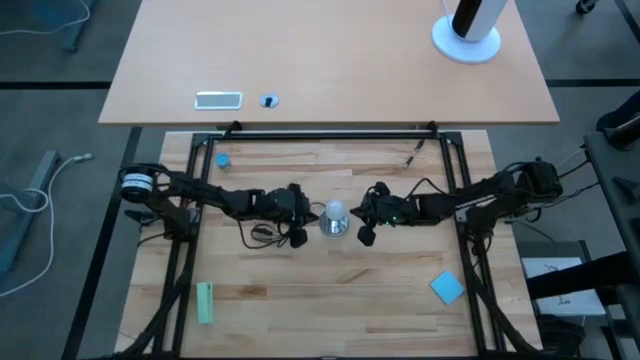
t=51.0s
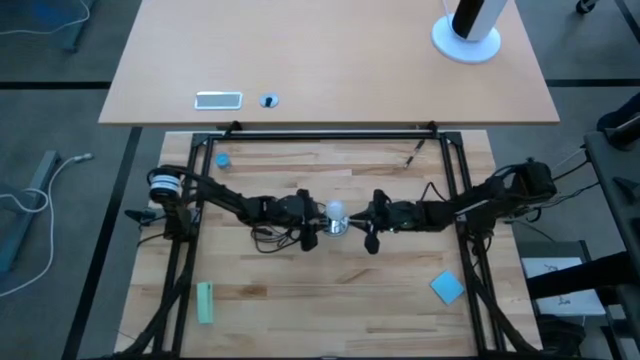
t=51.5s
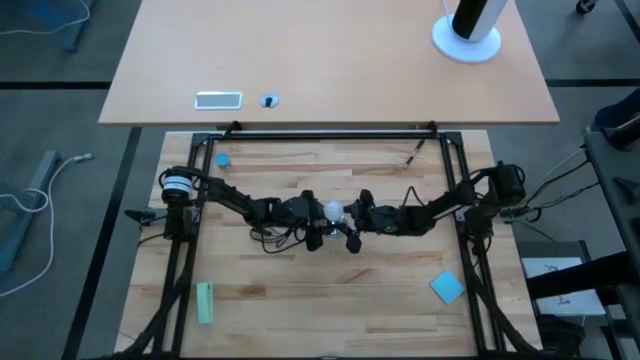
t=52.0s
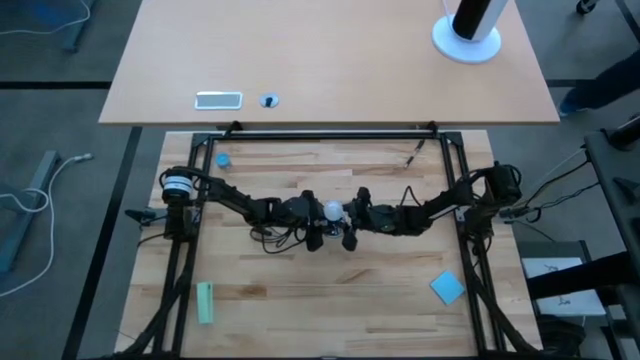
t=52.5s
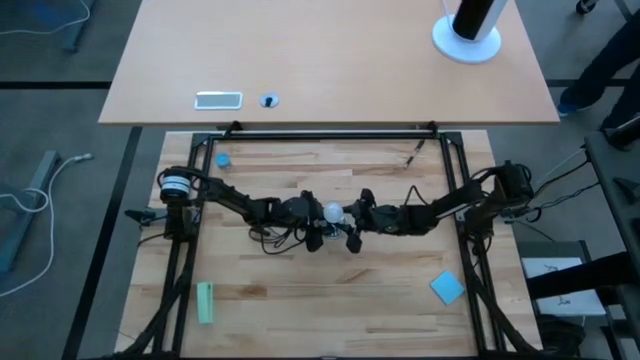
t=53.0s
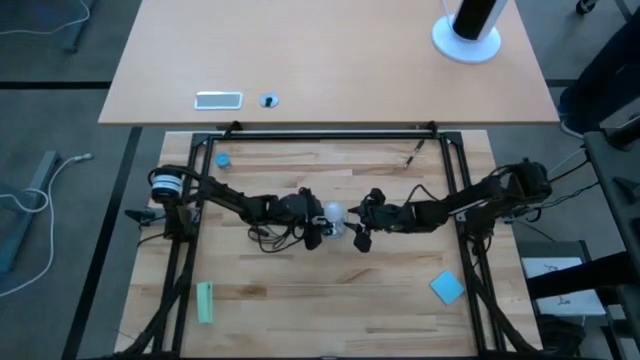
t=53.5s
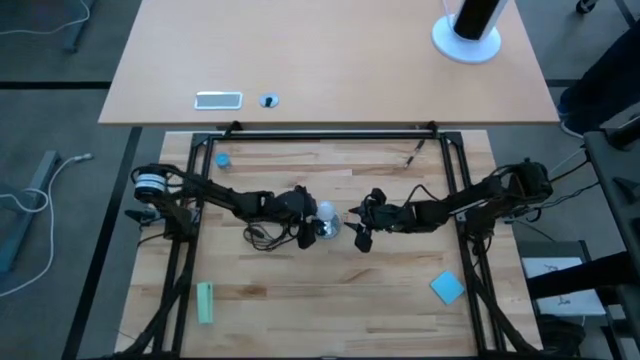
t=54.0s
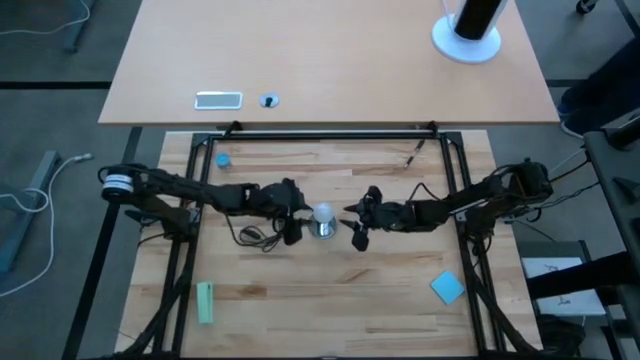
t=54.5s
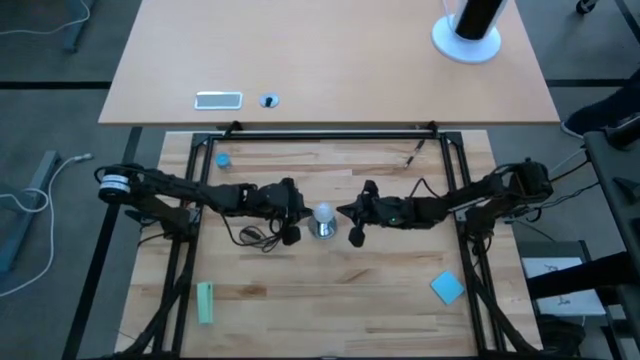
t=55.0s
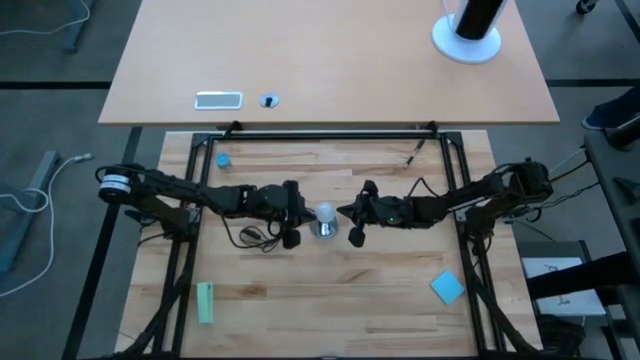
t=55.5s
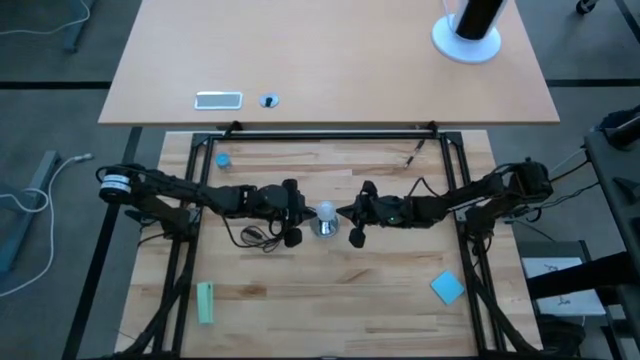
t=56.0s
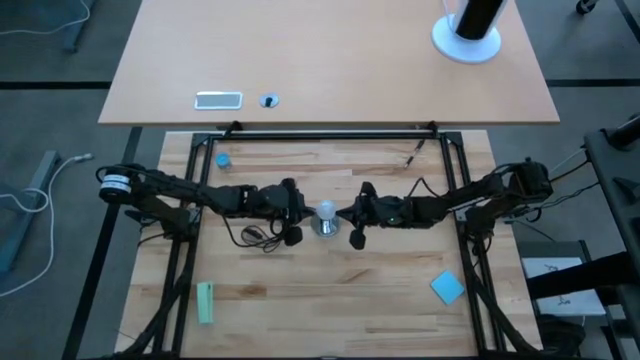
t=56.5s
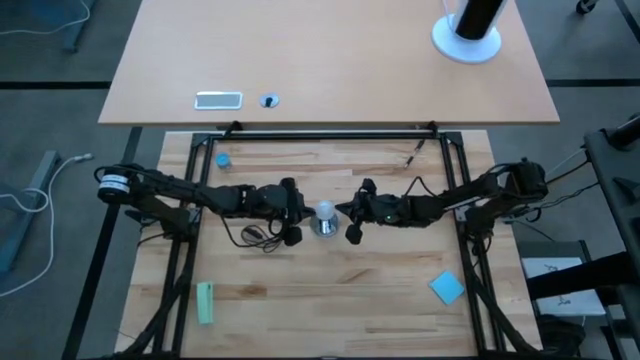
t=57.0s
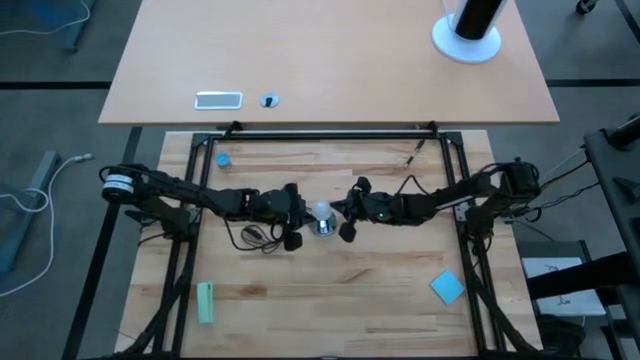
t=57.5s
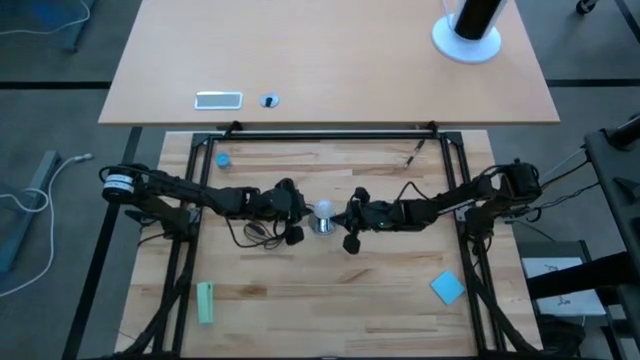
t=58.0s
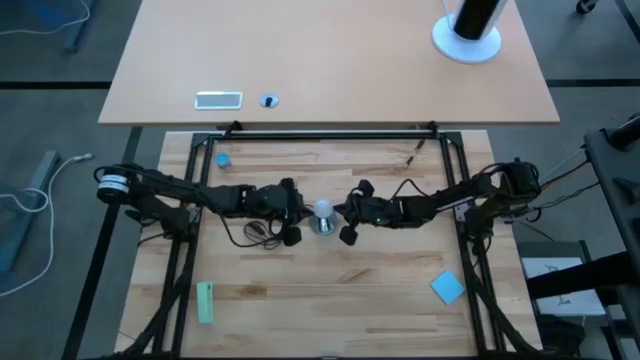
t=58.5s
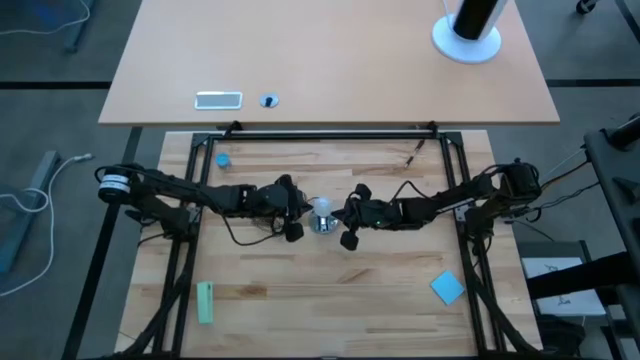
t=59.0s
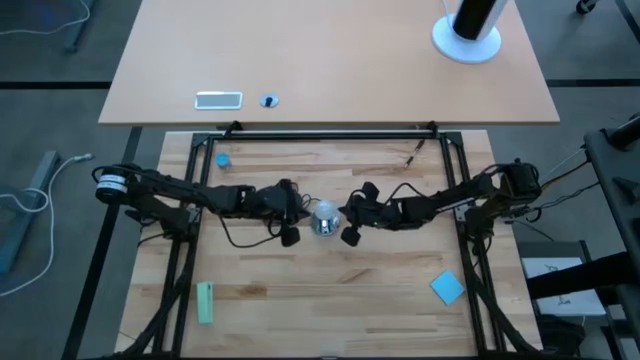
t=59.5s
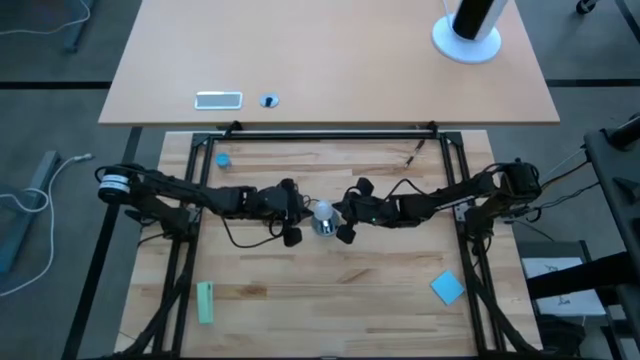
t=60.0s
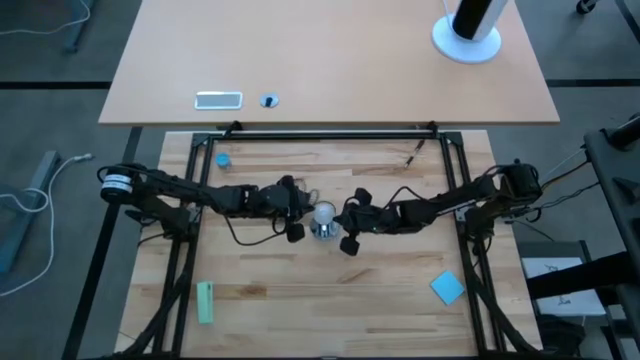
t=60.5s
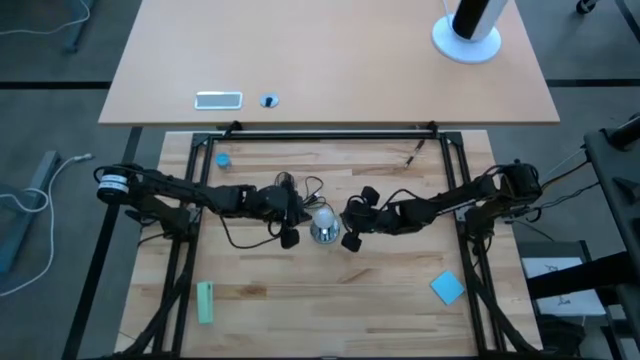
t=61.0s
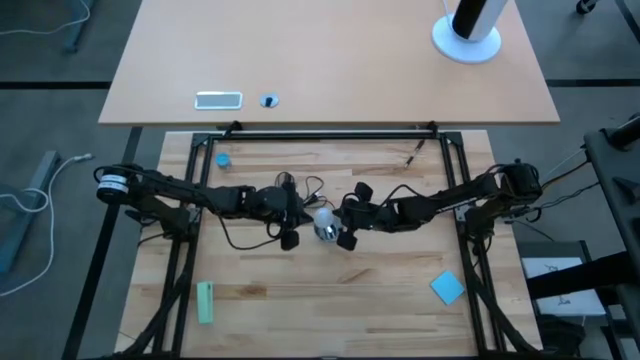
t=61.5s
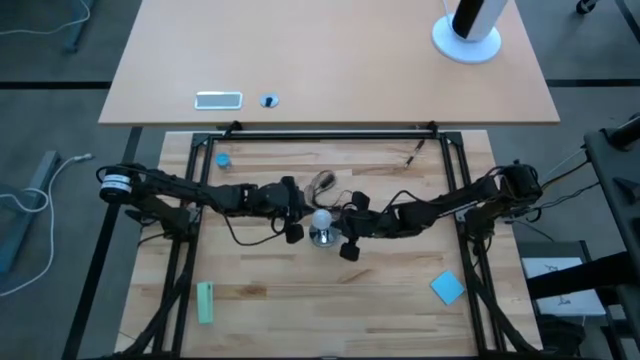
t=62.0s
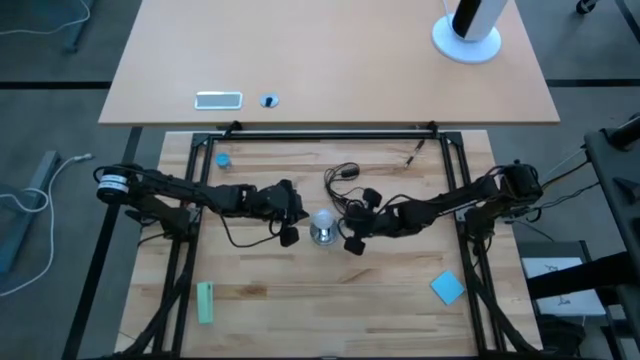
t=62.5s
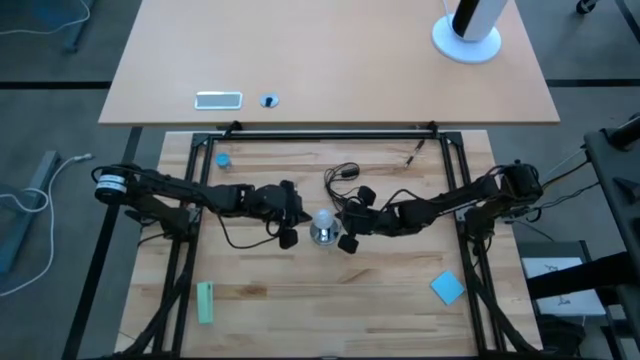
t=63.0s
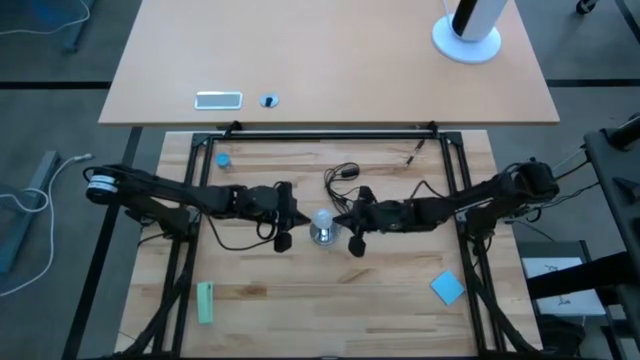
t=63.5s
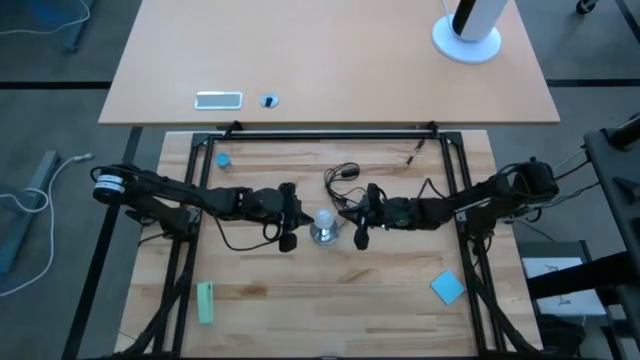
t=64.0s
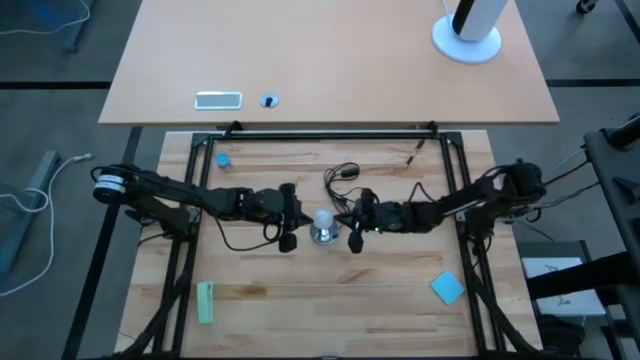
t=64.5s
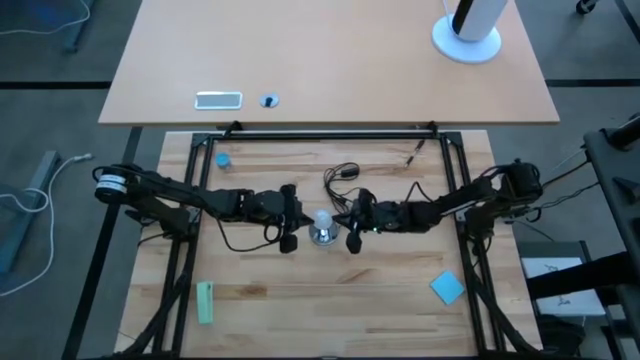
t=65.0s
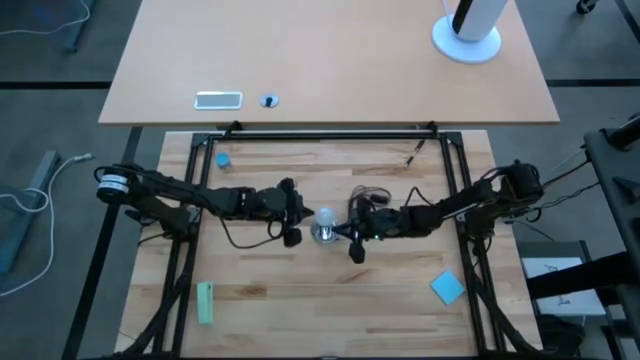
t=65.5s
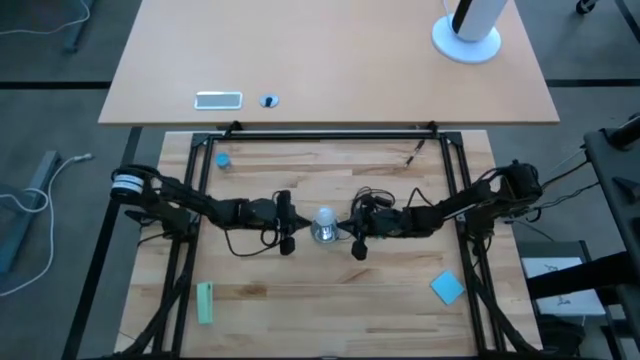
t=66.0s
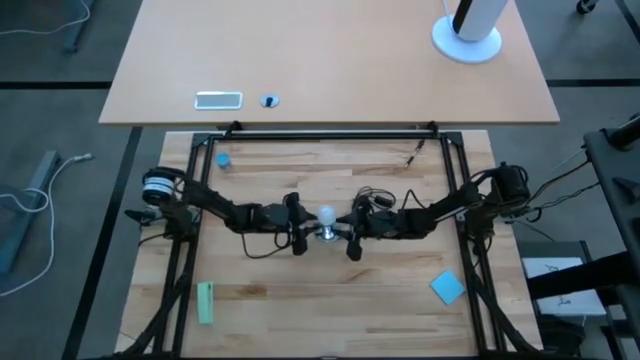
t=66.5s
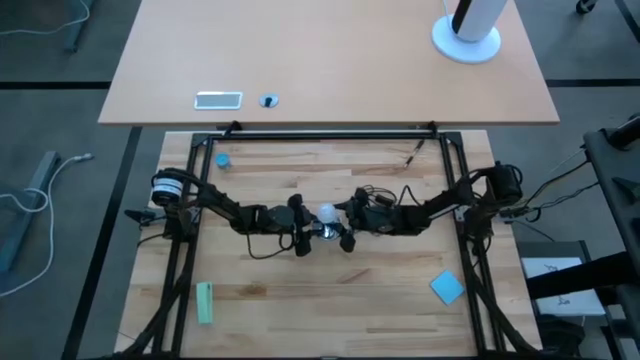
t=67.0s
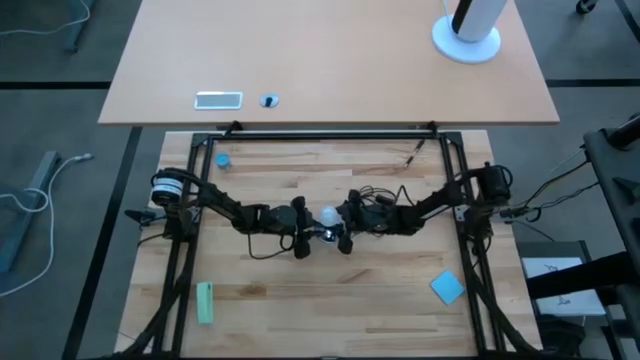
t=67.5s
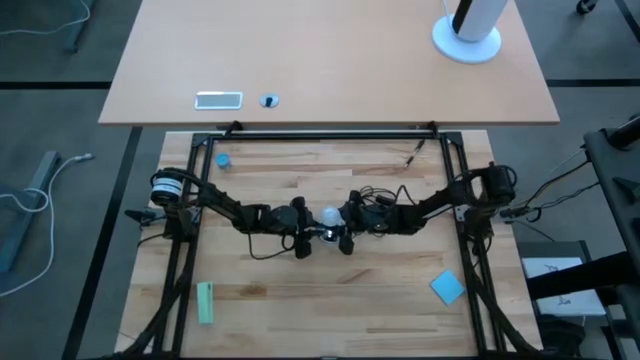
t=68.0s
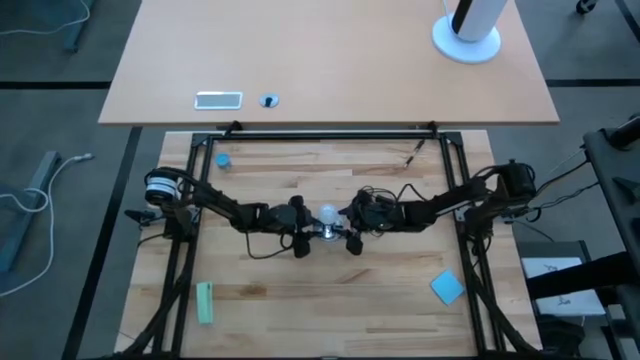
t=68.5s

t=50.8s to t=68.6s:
Task: Screw lightbulb
Insert the white lightbulb into the metal lamp
